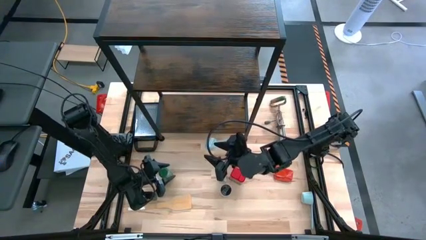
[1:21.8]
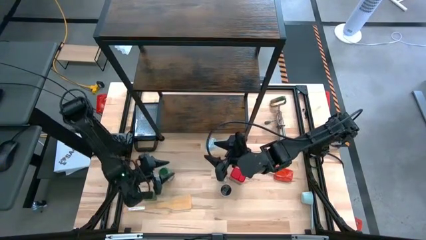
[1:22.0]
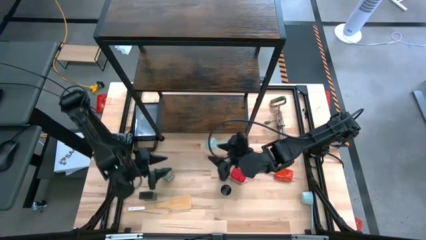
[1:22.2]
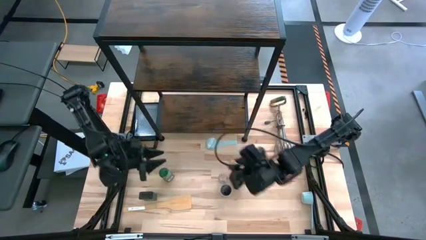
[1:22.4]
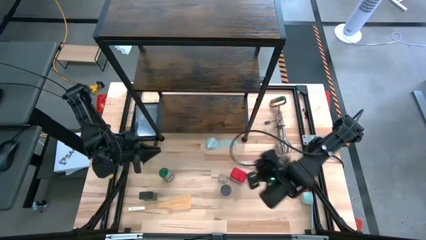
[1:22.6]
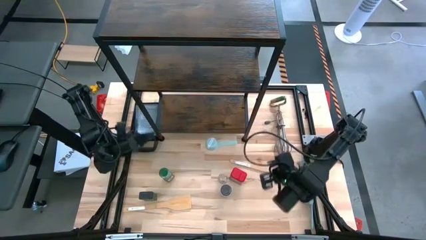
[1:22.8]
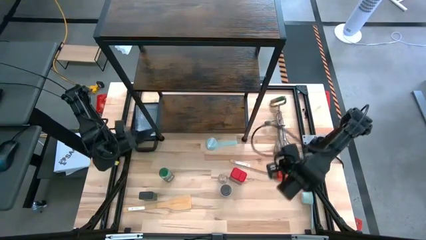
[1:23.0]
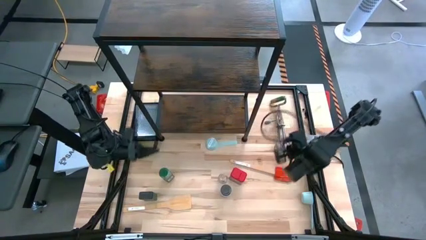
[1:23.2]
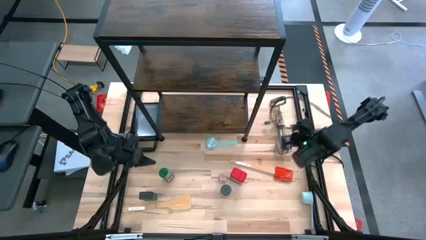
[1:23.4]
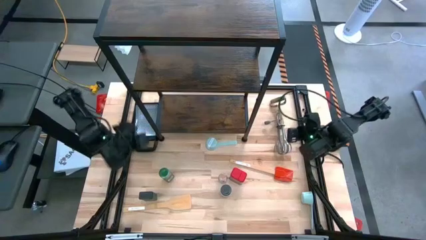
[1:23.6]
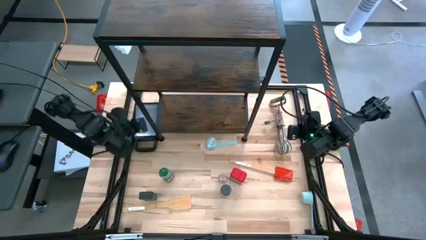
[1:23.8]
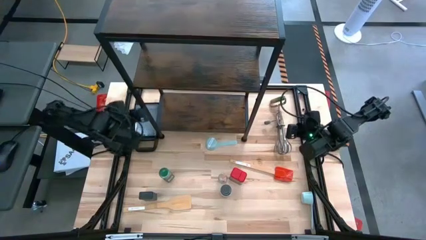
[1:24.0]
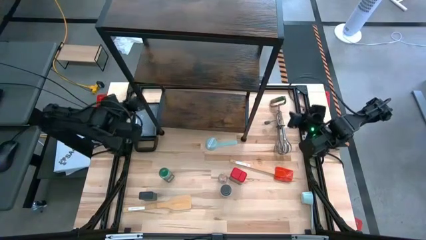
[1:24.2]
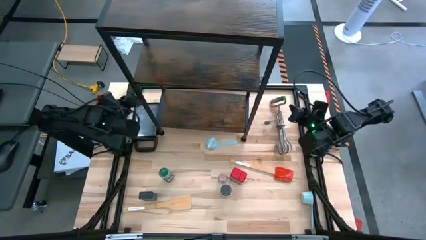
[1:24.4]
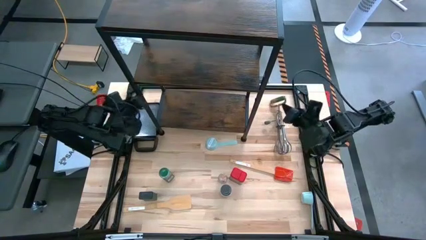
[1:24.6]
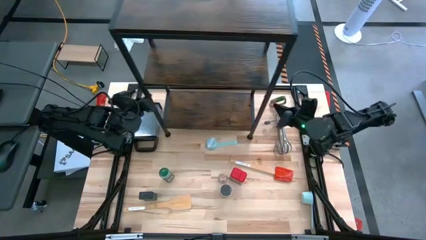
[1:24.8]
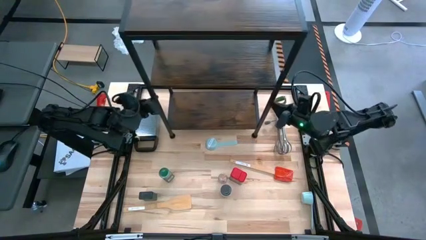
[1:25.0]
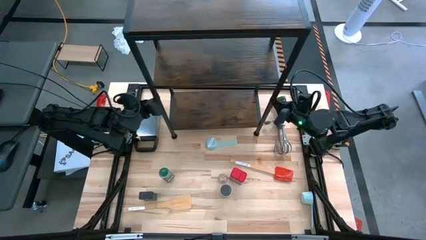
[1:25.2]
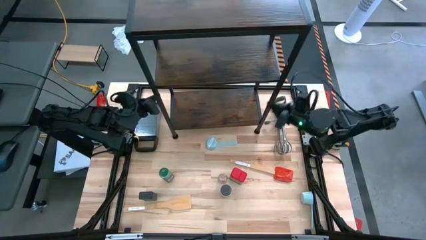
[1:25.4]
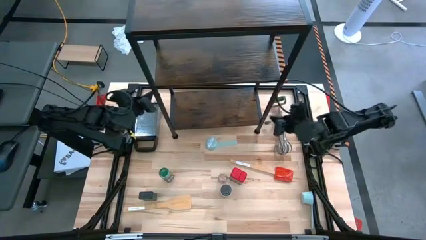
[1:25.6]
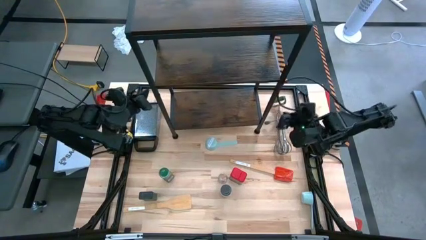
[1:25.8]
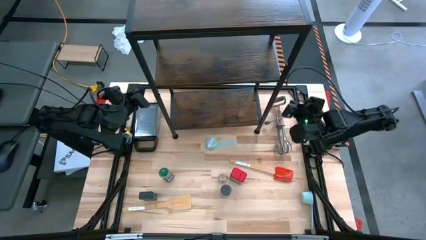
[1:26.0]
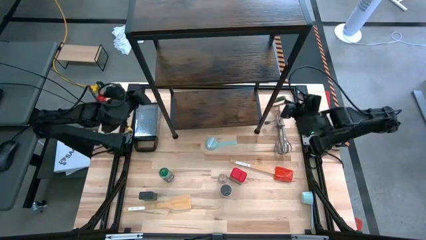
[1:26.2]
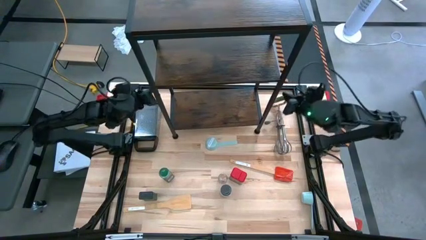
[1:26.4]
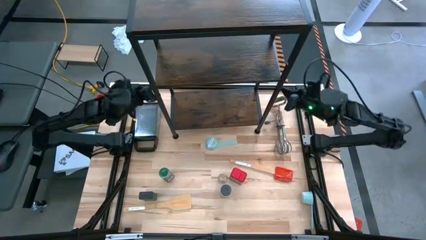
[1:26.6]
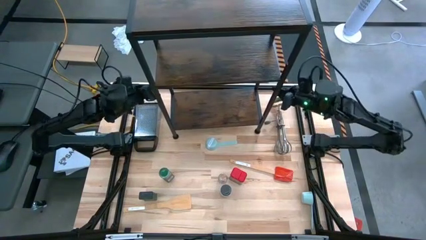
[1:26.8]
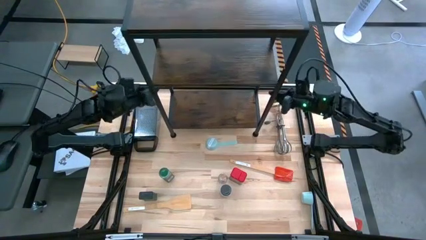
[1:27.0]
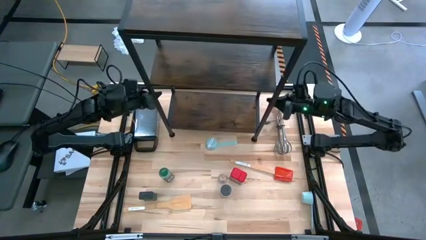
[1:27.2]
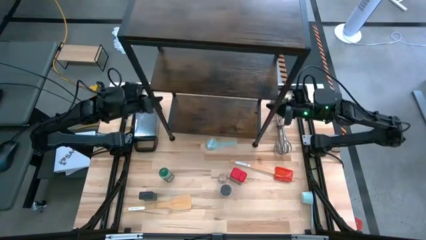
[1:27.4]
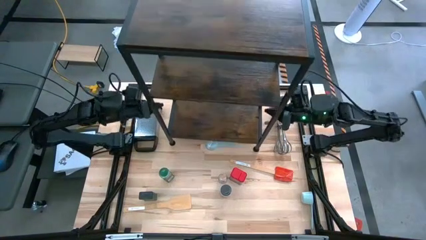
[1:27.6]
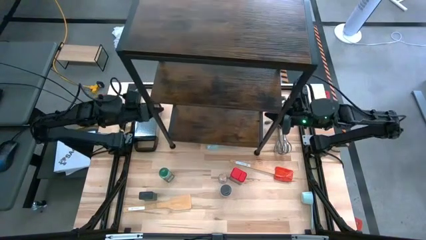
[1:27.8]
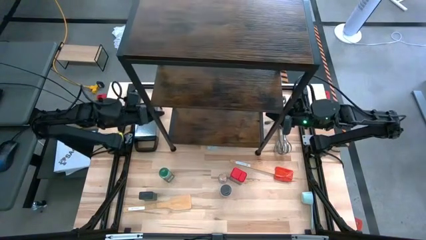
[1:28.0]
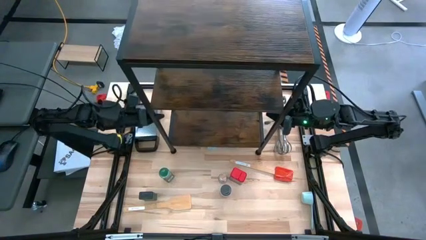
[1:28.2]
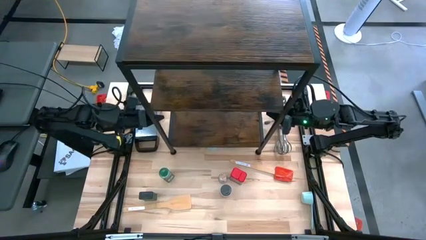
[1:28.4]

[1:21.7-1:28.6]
Task: Shelf spices
Adjust the shelf on the table
